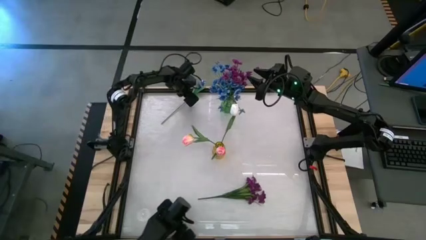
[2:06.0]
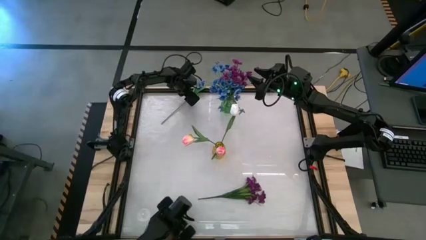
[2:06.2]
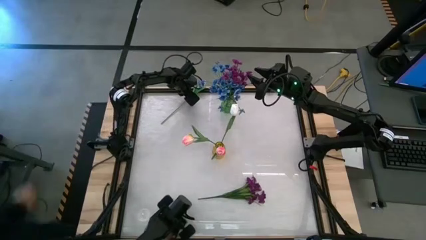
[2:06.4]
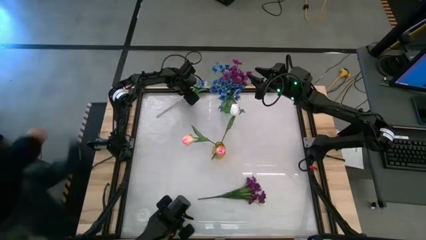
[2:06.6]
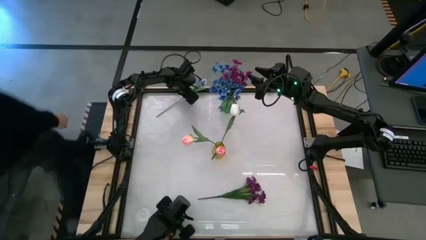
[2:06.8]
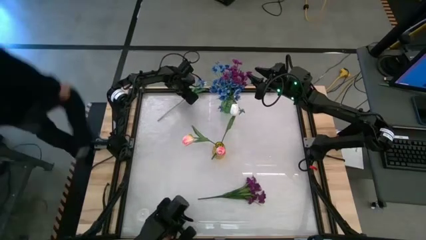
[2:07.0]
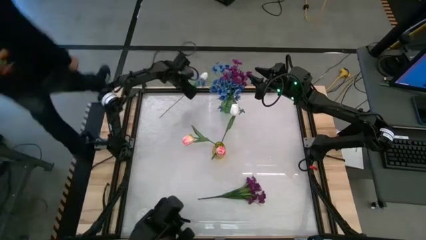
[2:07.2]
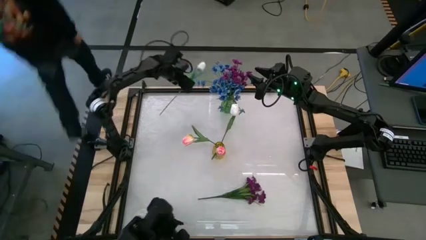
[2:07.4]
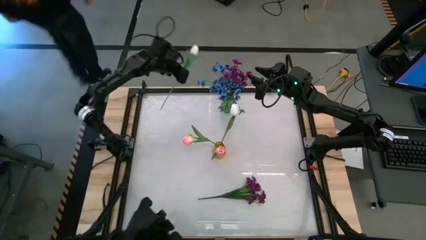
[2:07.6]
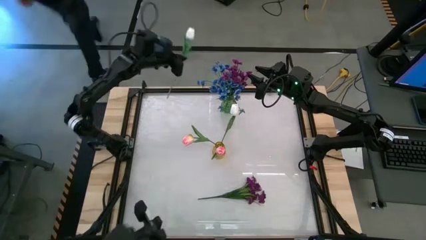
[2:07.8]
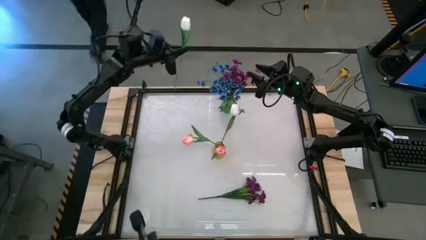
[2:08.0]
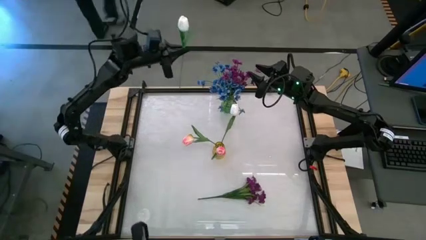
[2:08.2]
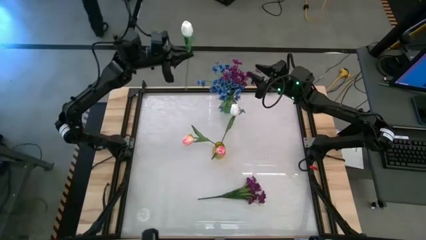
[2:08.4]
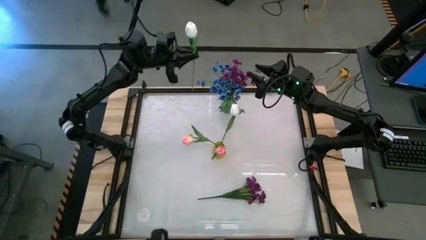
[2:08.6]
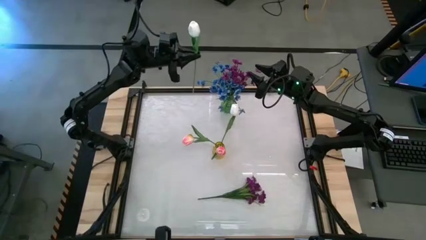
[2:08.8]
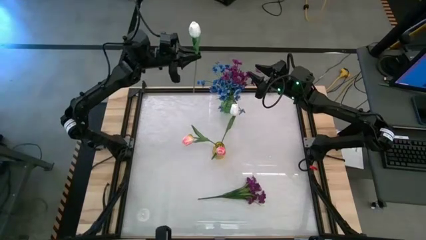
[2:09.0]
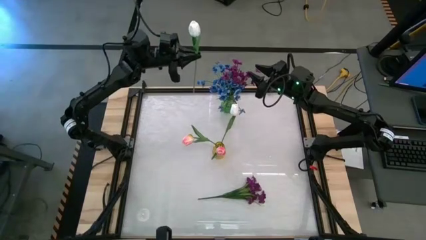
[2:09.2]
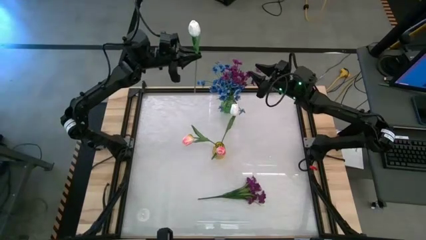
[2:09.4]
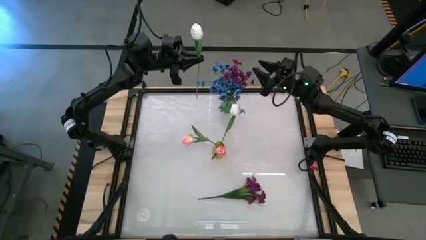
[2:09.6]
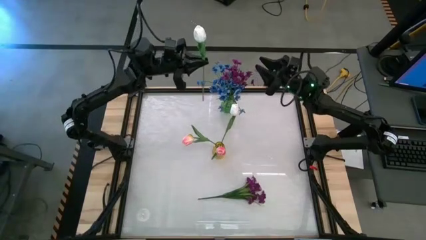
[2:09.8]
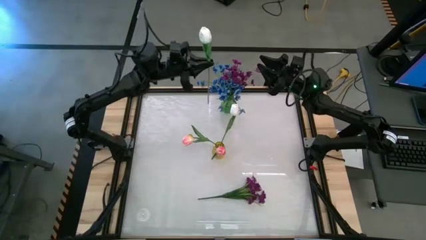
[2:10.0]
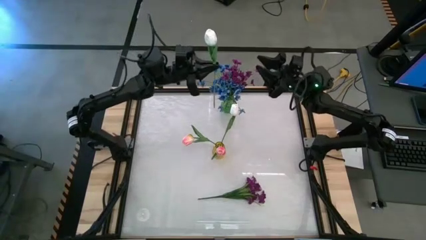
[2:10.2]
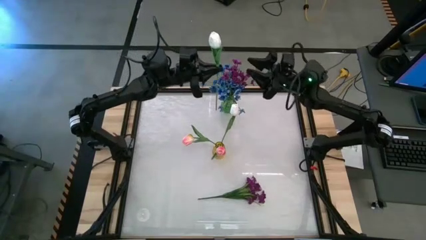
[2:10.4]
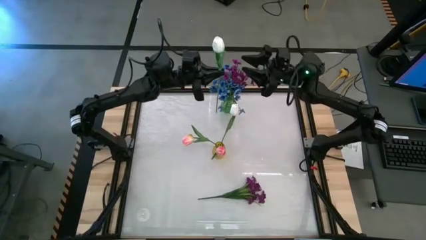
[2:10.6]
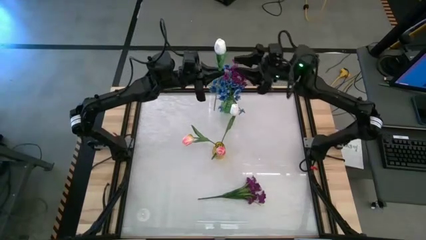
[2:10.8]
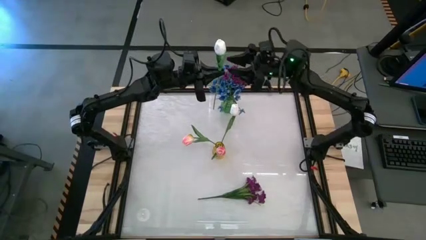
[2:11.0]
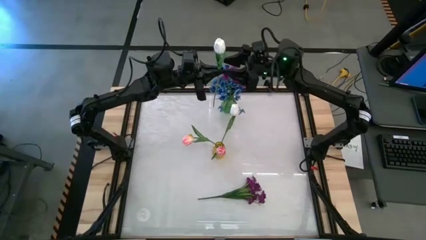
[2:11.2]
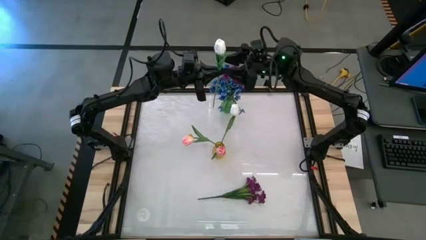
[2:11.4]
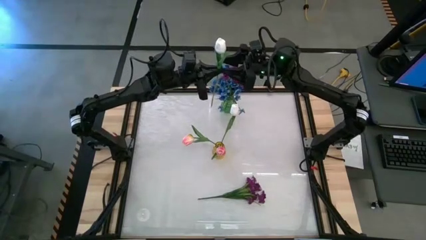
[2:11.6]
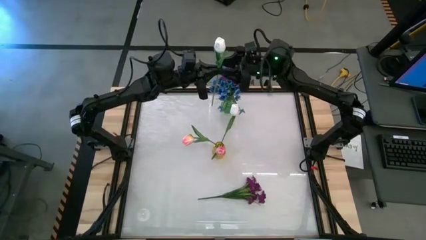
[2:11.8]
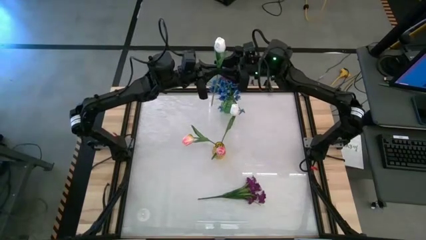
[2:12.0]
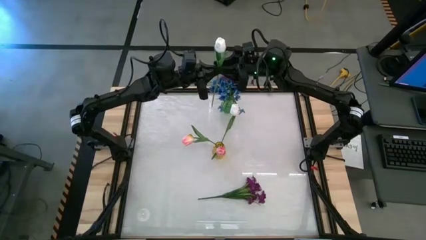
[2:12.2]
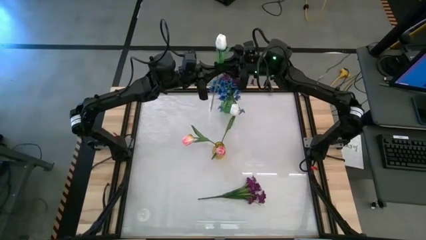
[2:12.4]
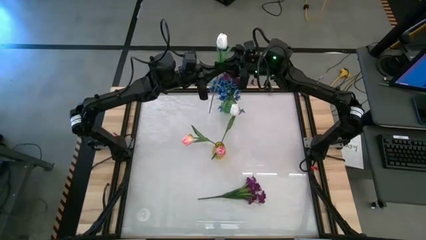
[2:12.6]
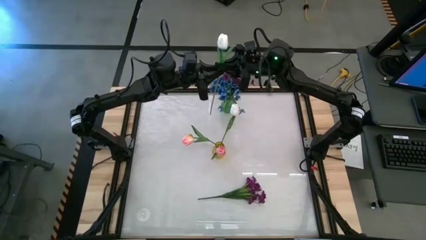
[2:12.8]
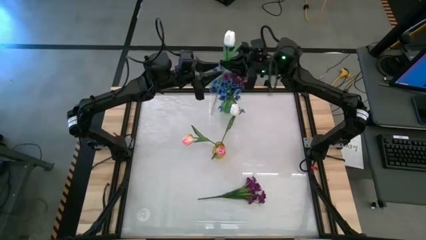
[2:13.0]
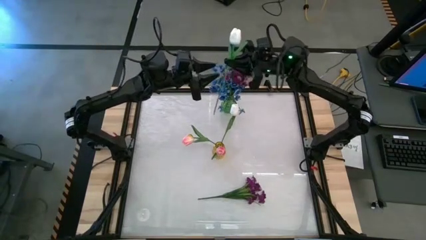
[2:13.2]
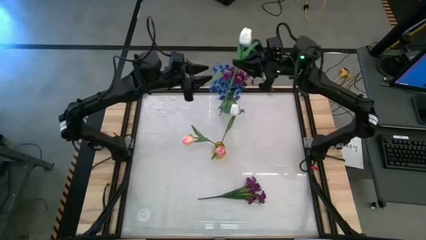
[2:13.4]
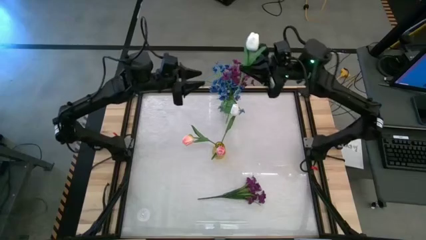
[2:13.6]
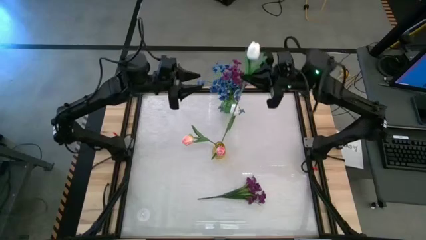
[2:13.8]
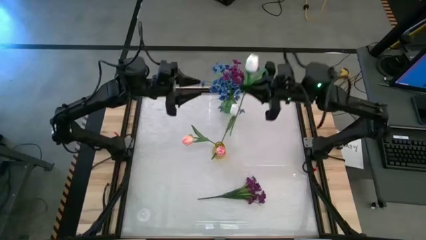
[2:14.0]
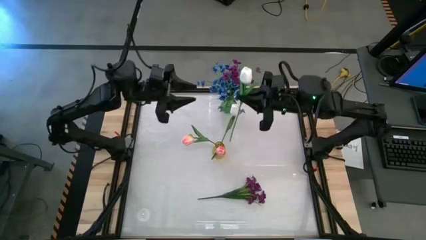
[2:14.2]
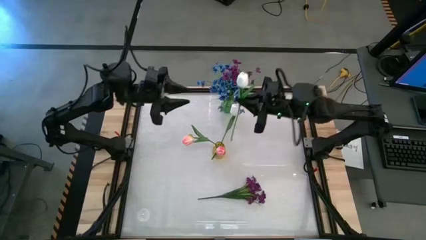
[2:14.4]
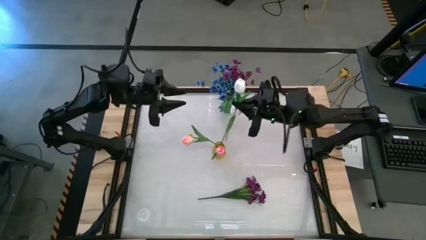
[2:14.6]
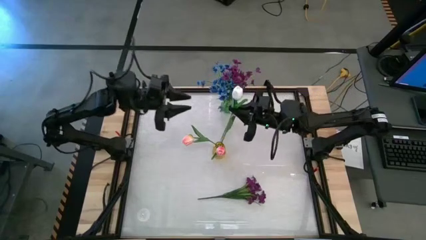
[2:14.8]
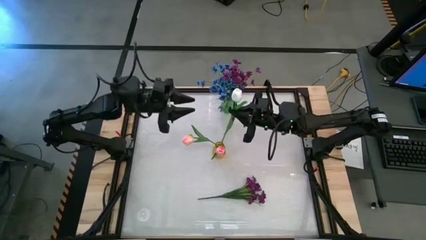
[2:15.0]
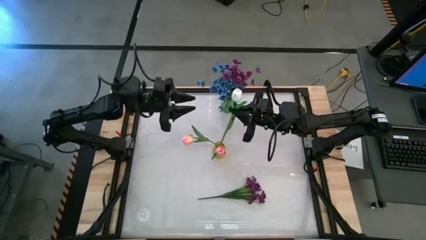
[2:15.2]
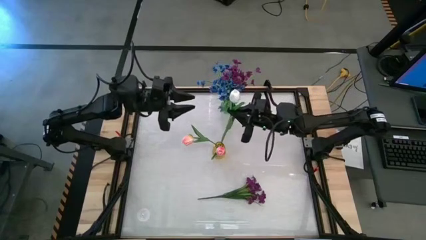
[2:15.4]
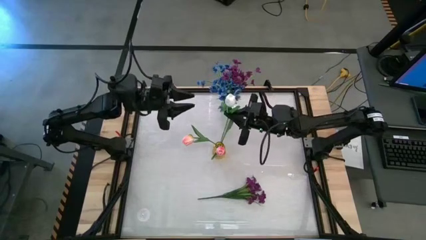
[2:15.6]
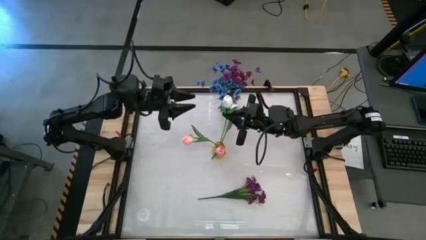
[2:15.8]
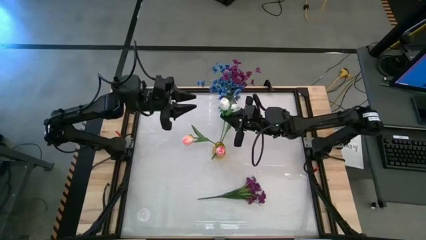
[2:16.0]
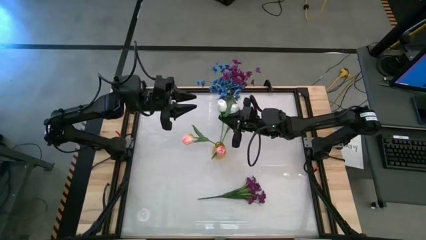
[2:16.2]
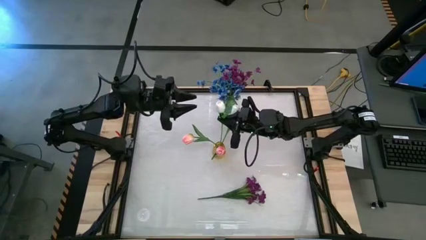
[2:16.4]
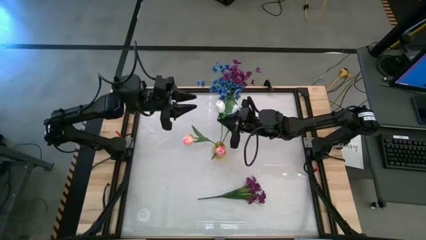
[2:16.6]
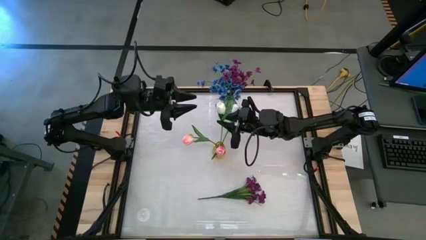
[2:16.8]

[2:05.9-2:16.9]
Task: Sort flowers into vase by color
Put the white flower into the yellow vase

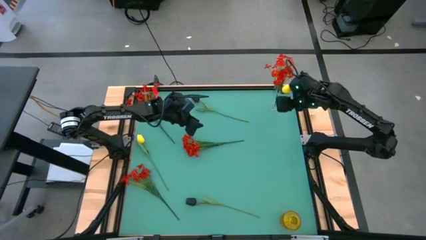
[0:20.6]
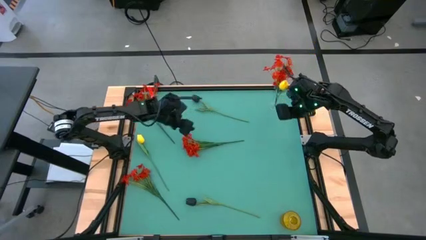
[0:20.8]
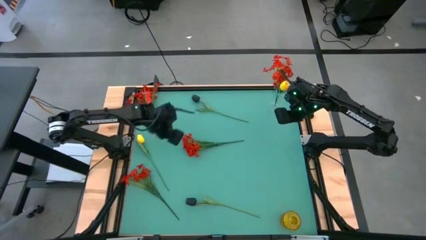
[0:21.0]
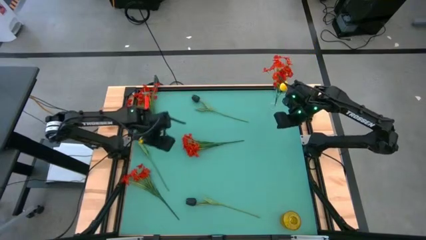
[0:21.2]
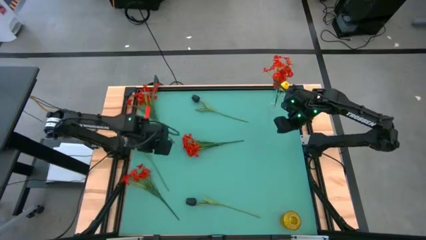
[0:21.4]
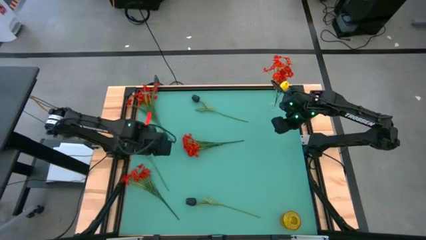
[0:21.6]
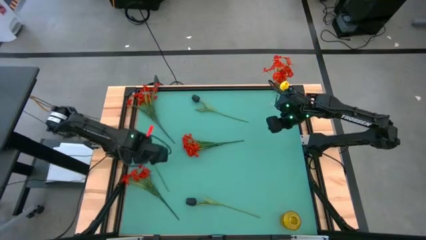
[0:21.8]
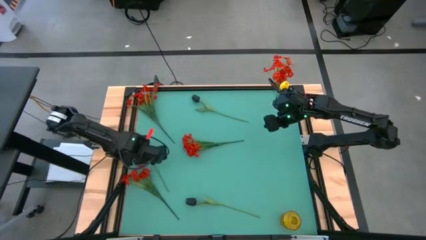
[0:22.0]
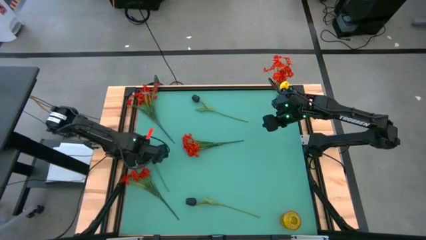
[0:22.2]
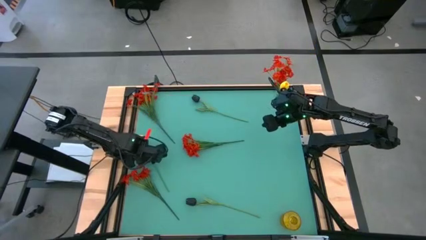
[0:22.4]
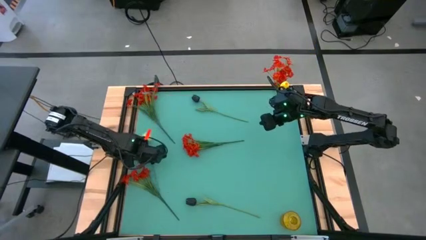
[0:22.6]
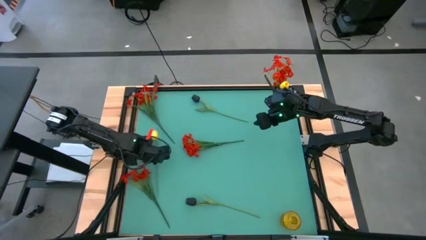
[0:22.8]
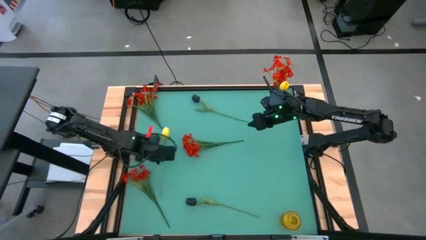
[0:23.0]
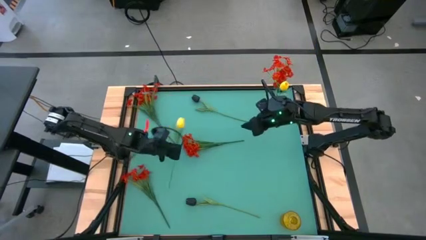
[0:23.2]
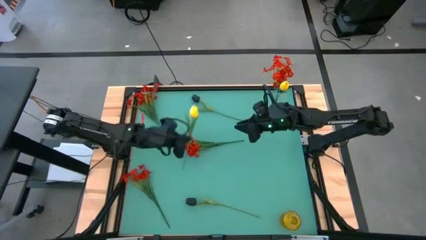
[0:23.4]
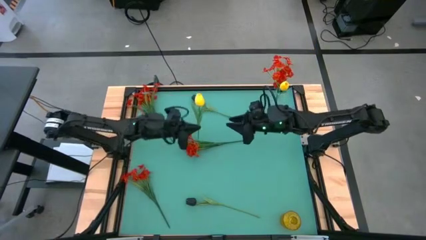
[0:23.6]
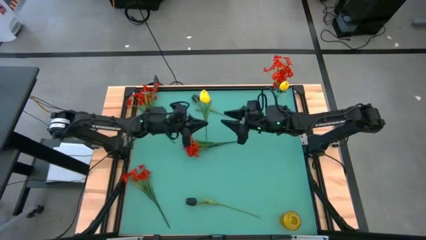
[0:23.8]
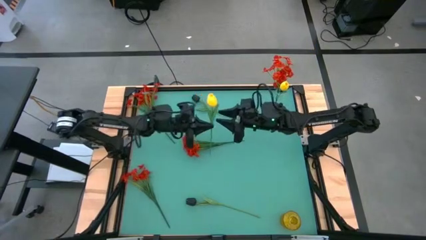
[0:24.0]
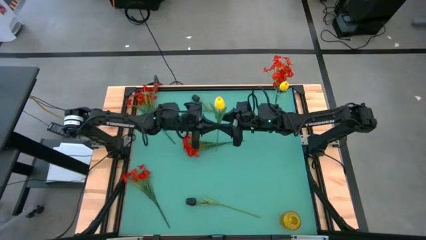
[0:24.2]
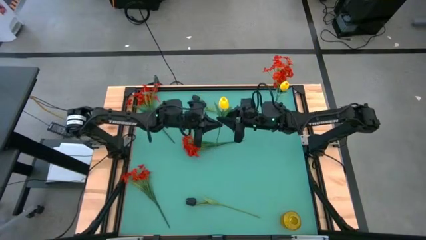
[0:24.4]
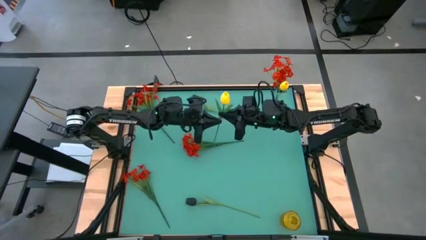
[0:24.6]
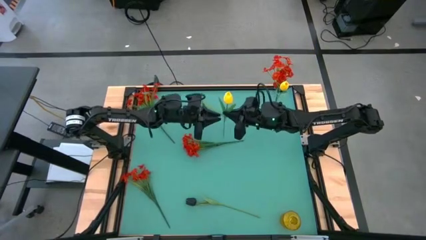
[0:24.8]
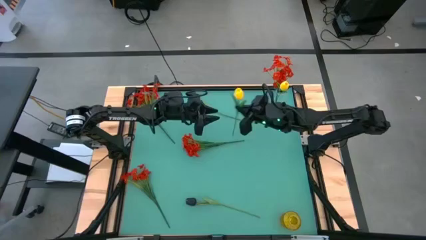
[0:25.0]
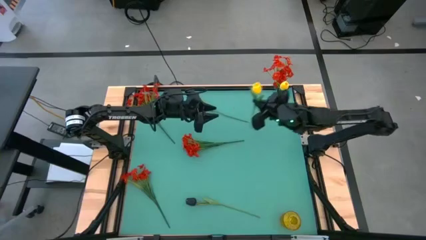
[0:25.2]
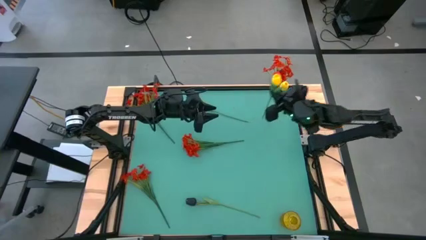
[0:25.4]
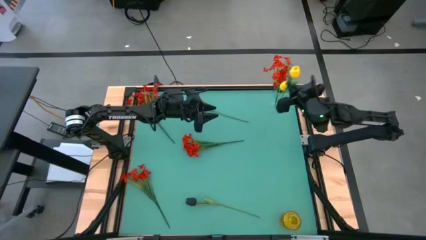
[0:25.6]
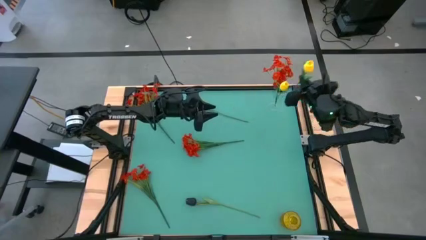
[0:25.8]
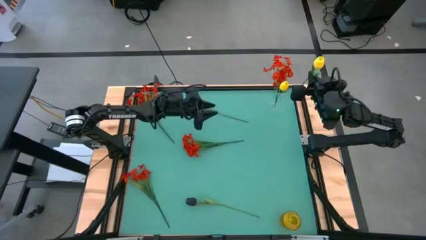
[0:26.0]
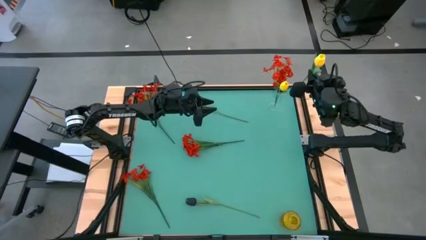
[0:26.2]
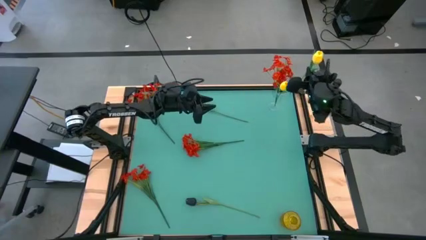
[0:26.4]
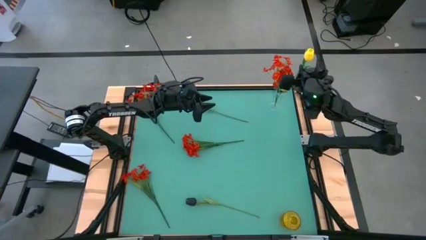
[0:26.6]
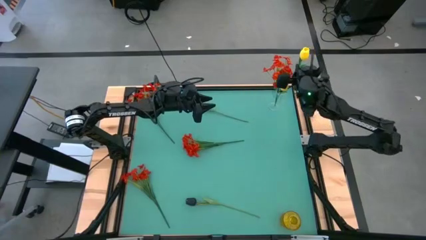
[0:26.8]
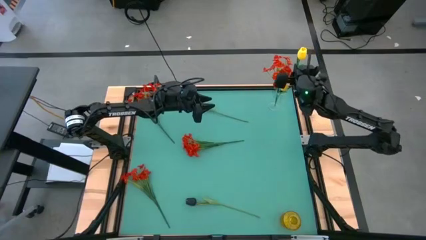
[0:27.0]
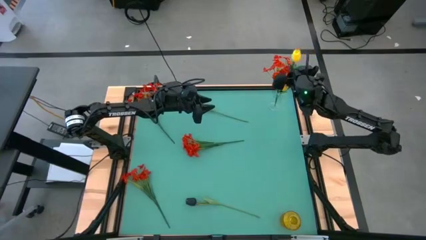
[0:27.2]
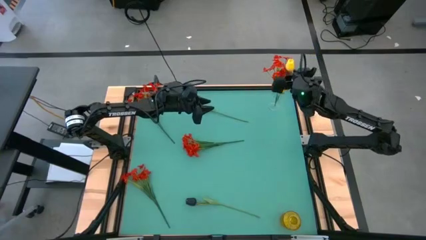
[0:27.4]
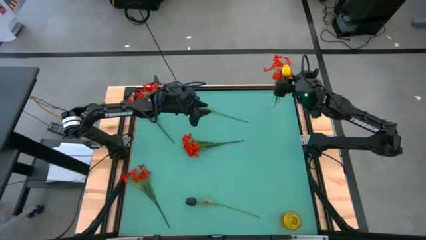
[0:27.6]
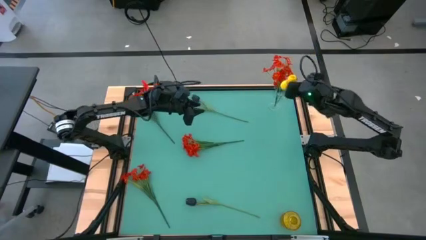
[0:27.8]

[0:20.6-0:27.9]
Task: Sort flowers into vase by color
Put the yellow flower into the transparent vase
